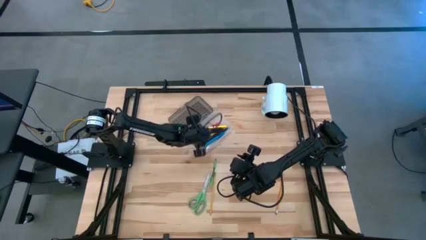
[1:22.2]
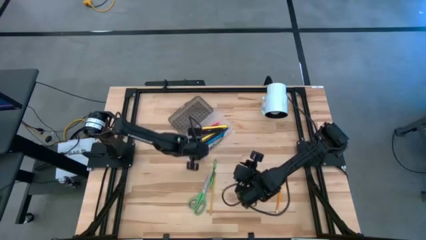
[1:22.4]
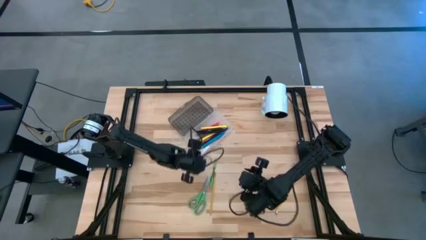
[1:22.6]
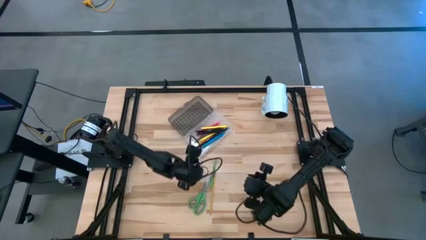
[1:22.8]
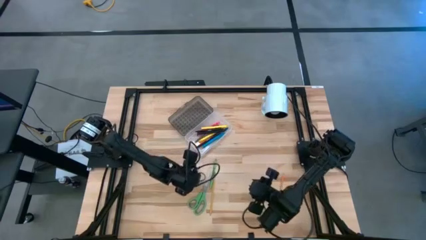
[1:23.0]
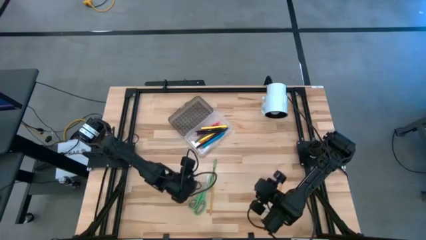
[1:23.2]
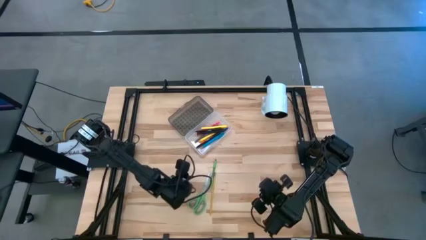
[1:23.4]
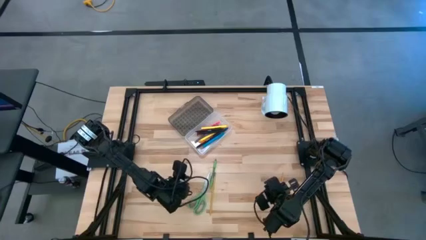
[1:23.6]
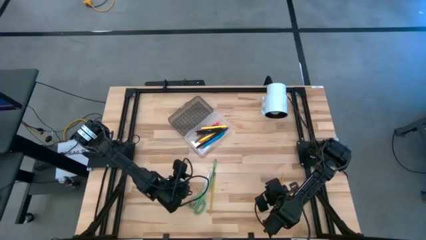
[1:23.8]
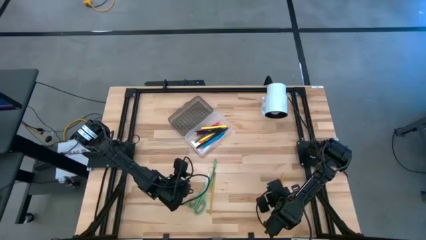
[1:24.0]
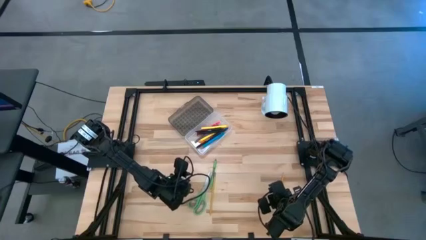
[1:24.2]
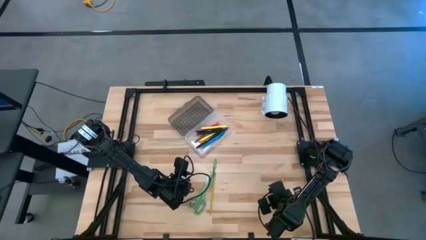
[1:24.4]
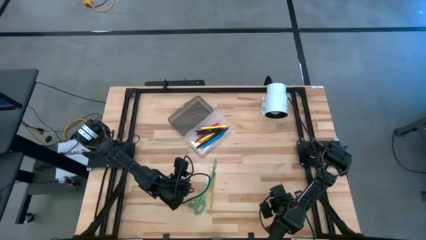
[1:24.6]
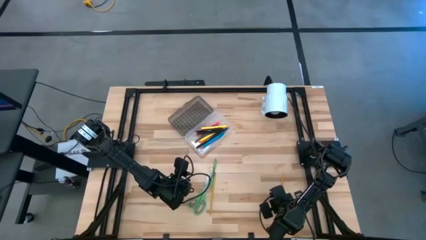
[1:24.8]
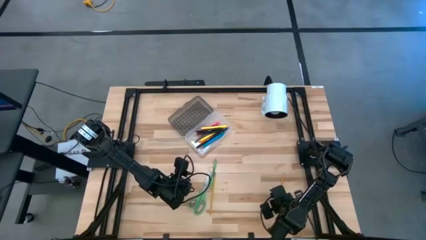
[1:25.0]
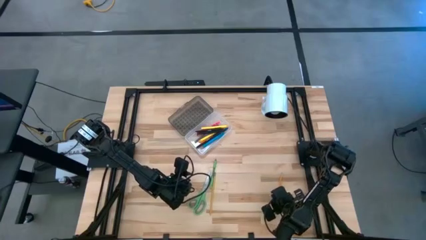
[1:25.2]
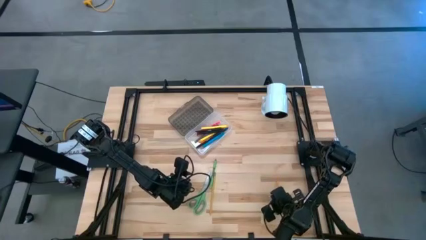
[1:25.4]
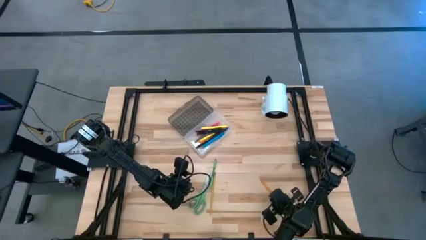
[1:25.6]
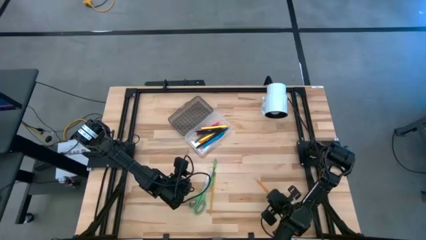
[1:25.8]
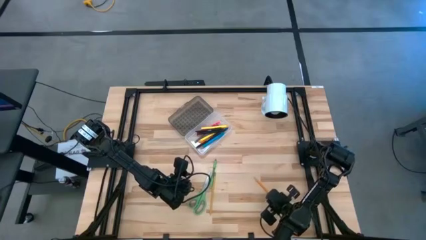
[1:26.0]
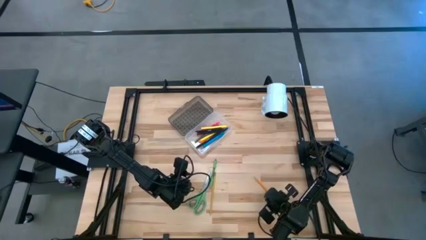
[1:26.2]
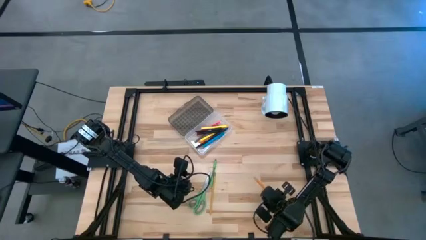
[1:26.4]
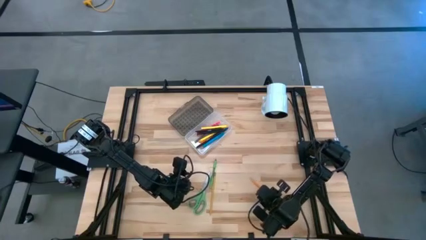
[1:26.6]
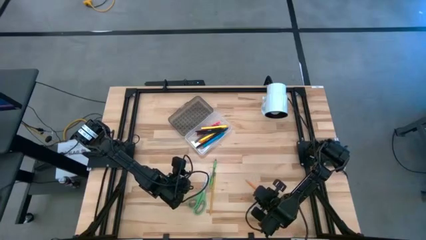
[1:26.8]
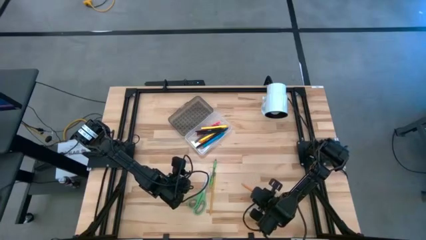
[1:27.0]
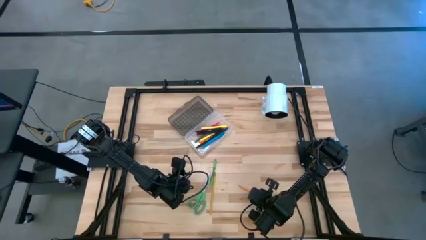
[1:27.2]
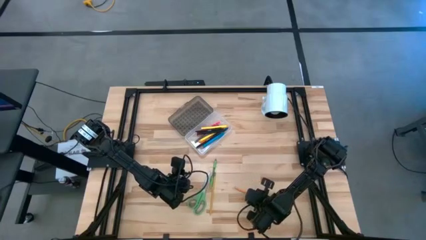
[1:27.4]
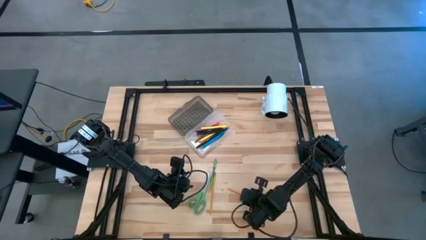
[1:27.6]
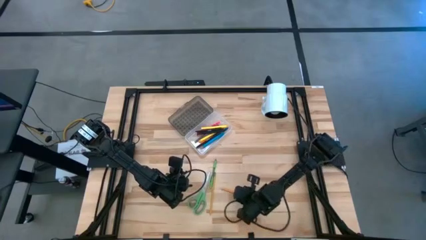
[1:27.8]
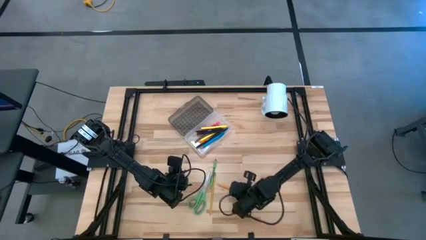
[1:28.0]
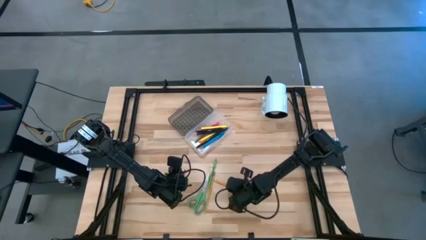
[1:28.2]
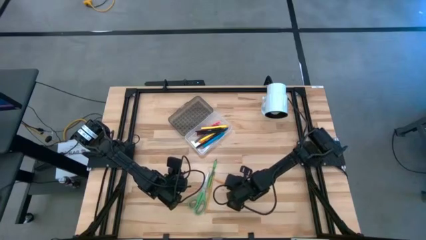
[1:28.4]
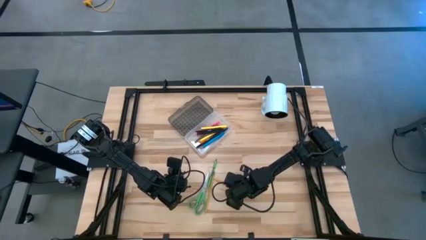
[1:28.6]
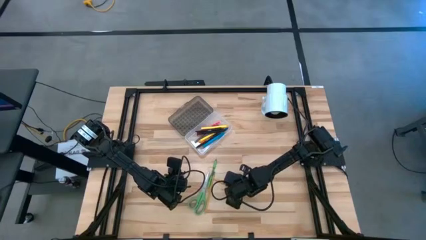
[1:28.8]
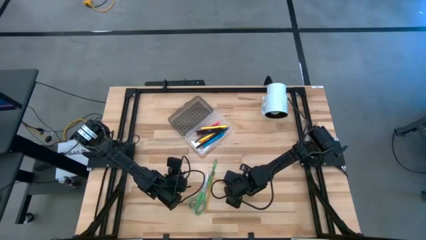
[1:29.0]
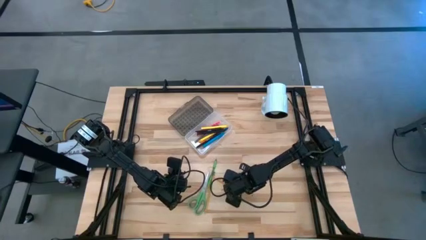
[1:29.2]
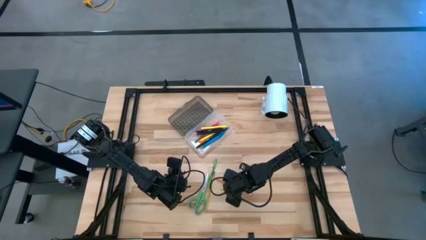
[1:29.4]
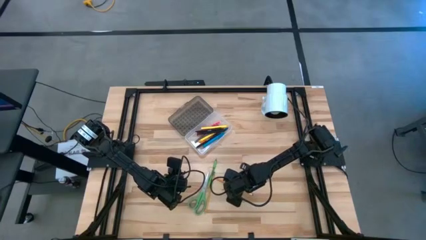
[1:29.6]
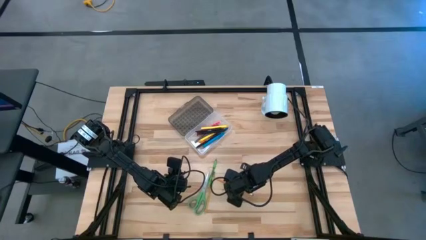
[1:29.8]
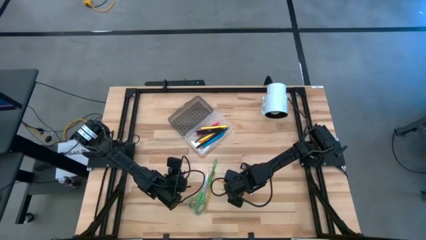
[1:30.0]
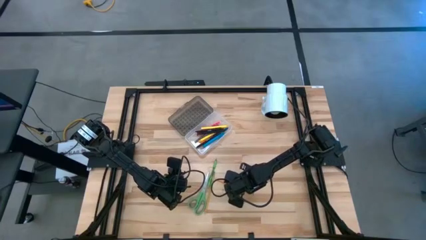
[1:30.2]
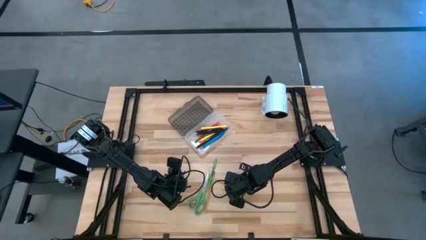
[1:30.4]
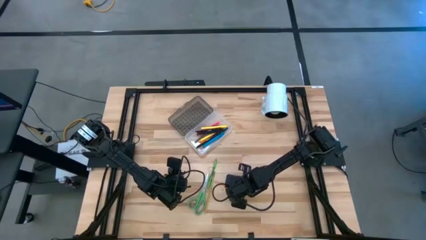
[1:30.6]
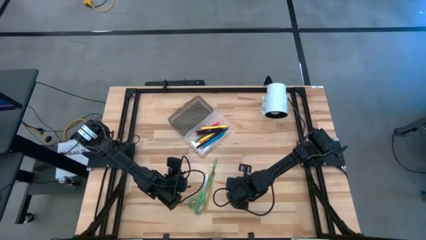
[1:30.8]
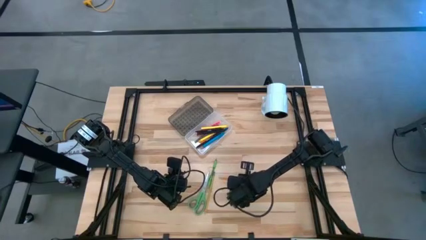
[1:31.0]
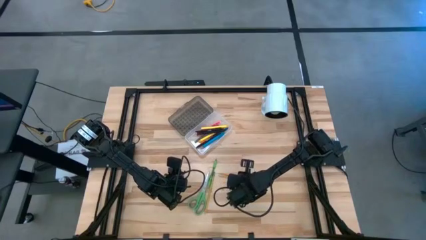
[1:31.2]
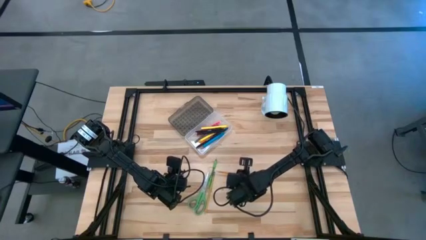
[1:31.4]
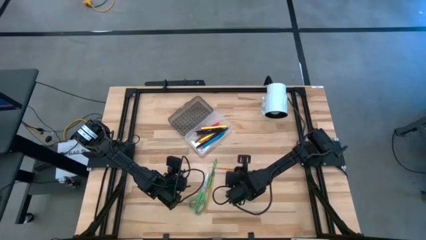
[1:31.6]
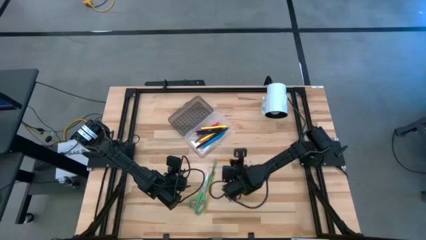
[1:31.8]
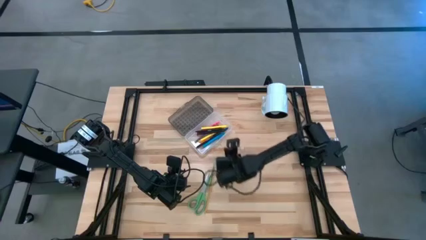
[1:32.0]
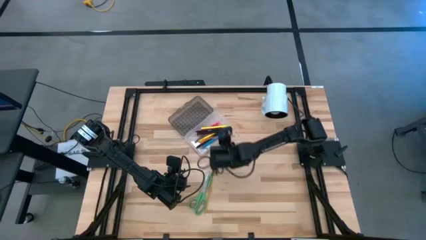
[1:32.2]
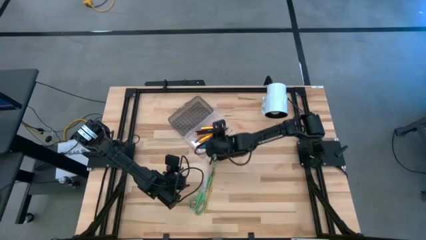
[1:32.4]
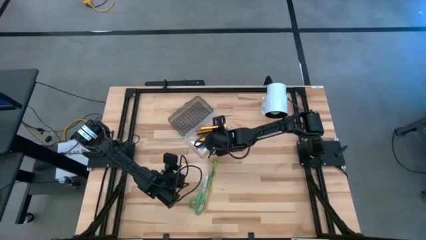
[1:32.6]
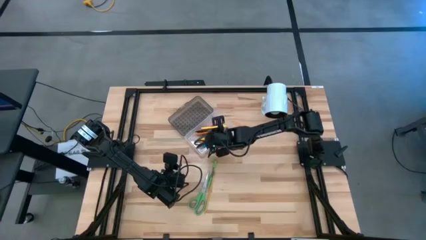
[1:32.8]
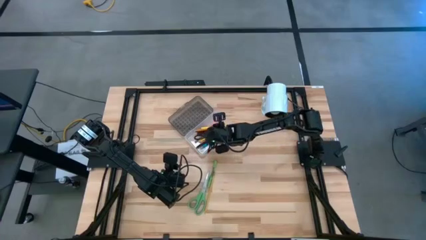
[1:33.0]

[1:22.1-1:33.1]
Task: Pick & place school supplies into a supply box
Put the orange pencil into the transparent supply box

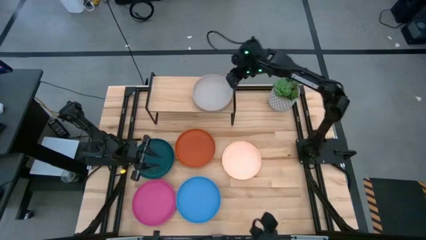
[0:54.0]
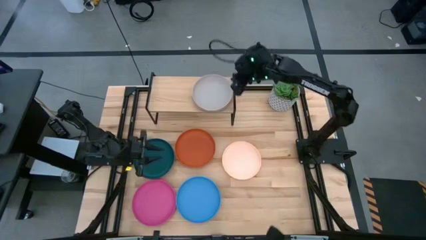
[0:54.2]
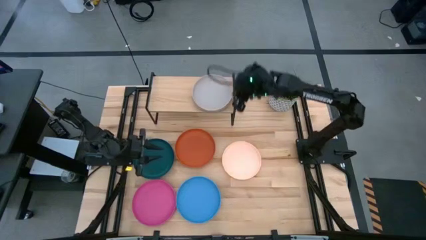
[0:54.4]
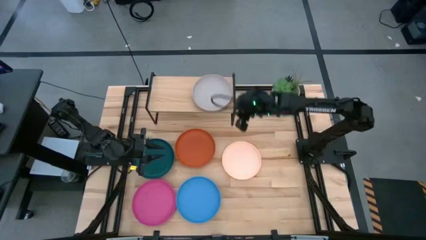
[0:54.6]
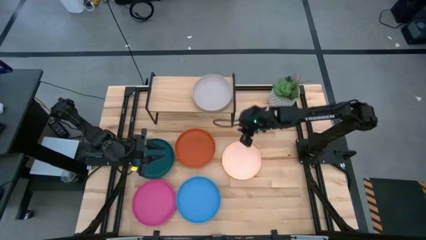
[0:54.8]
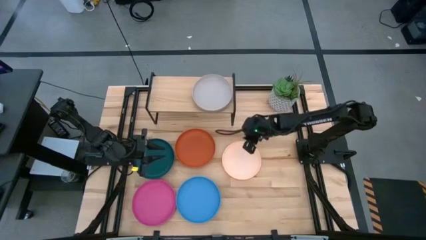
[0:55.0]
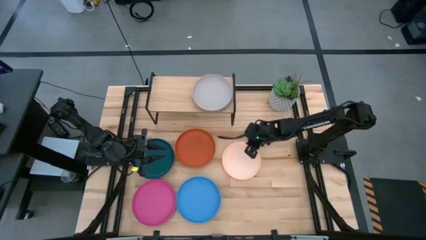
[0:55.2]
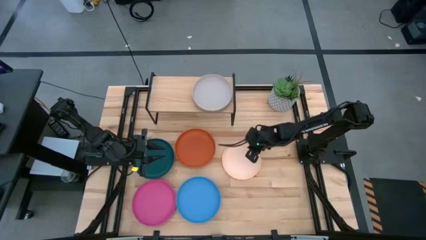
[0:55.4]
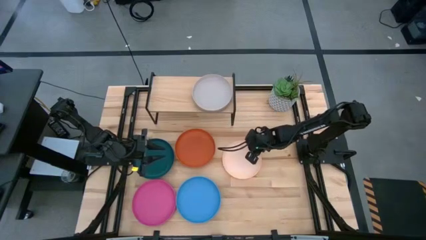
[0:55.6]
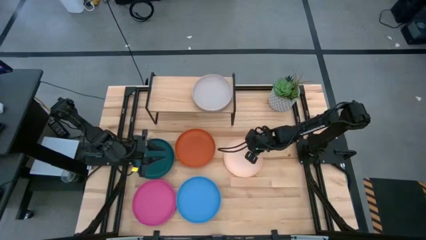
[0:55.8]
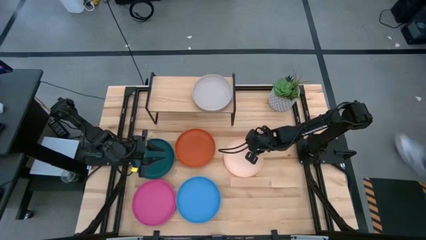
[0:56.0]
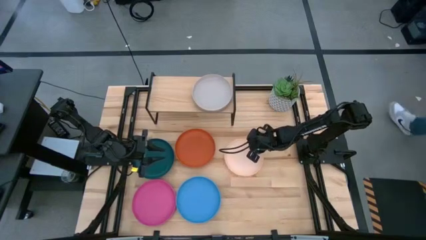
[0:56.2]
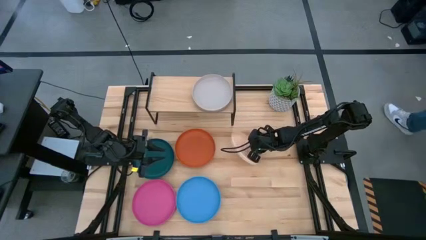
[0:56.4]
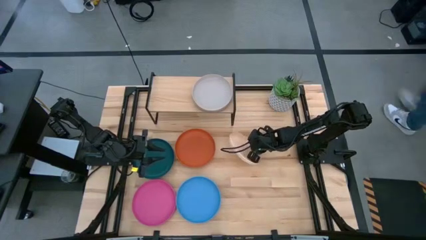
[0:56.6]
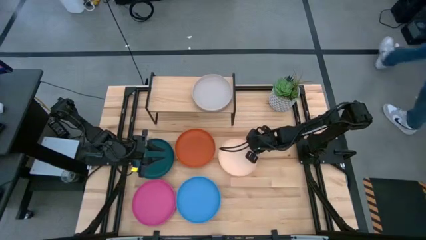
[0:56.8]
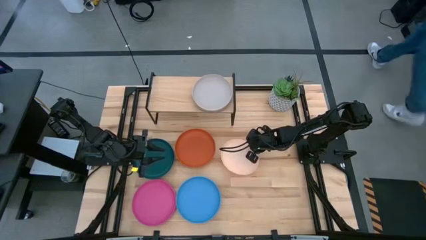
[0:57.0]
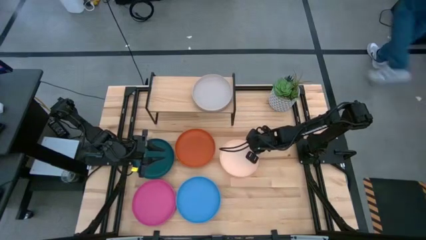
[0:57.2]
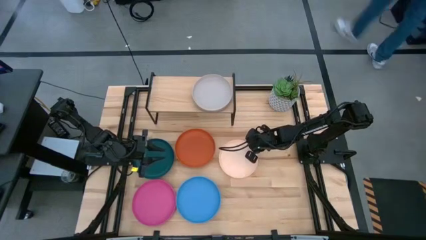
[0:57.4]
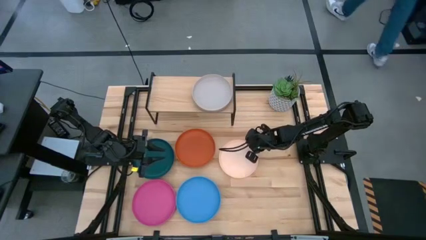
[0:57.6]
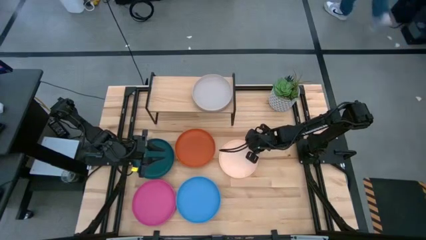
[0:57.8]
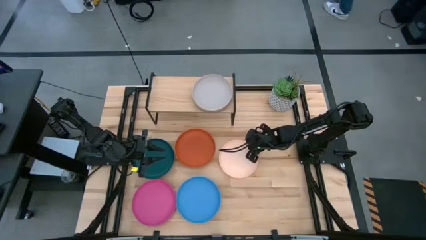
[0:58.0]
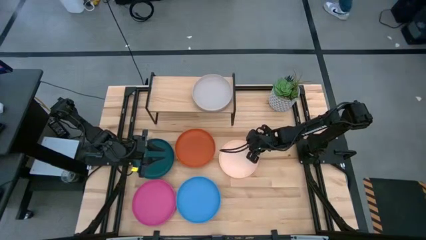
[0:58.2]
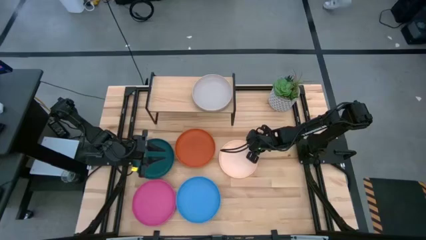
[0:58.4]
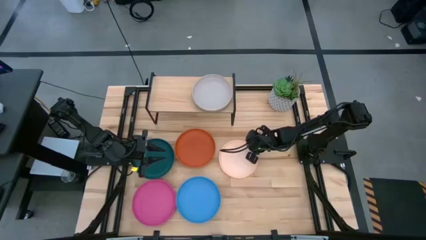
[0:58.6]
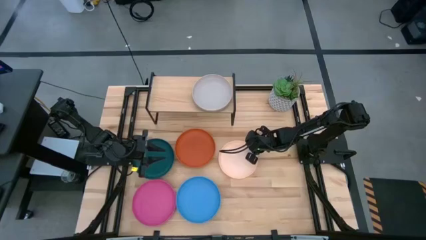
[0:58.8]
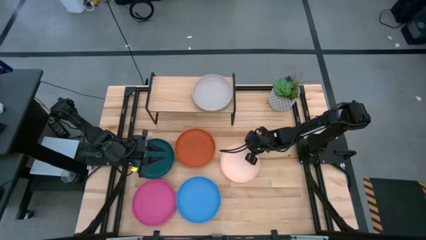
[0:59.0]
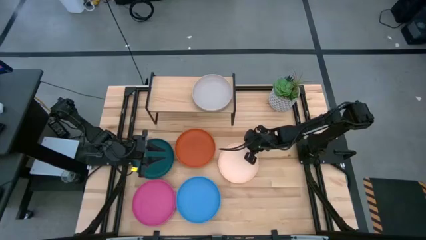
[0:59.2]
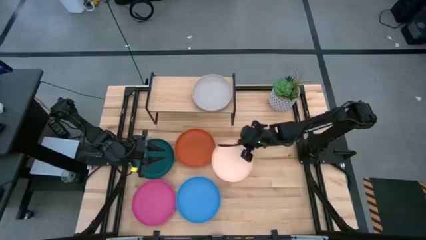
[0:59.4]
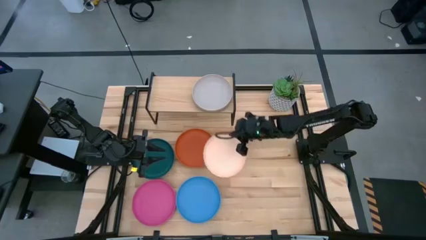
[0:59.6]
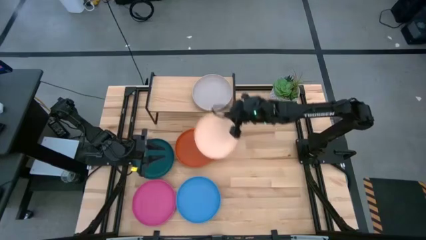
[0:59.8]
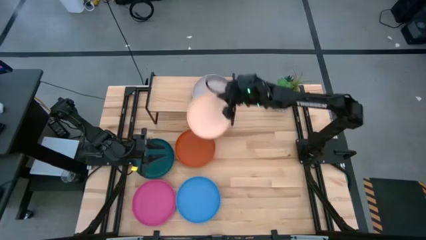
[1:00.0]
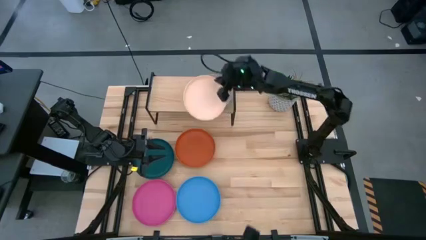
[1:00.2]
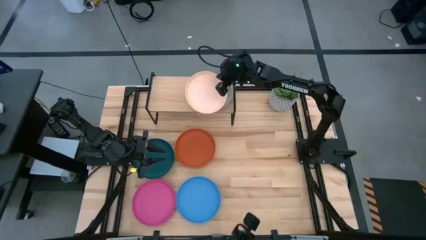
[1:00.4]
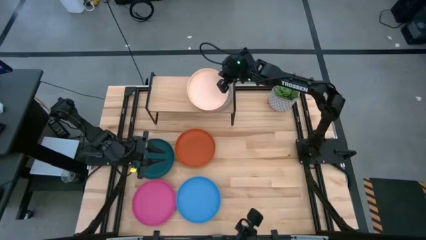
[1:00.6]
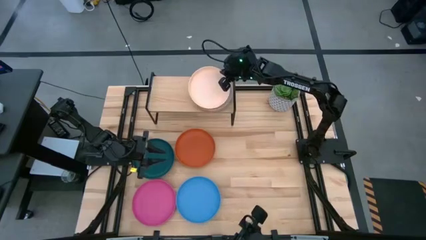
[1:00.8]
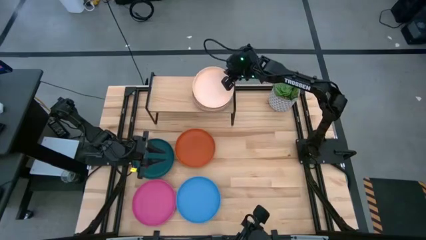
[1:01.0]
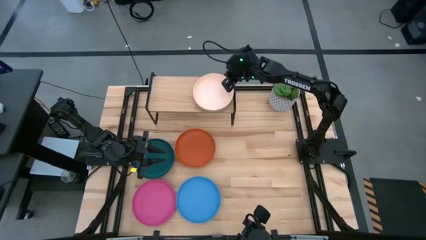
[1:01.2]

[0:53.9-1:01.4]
Task: Place and stack plates onto a shelf
Stack the light orange plate into the gray plate on the shelf
